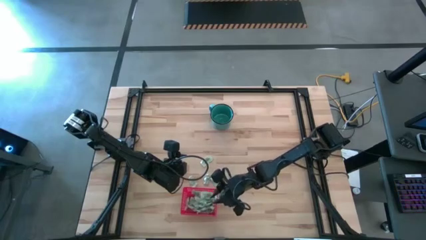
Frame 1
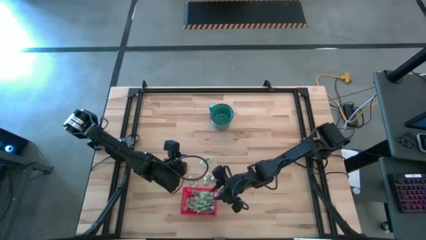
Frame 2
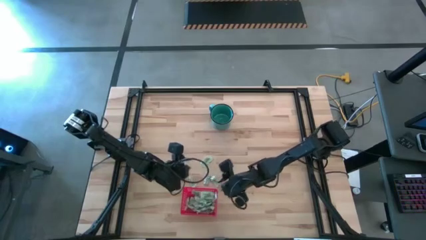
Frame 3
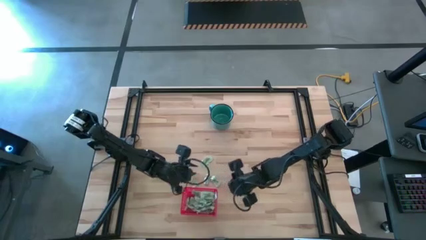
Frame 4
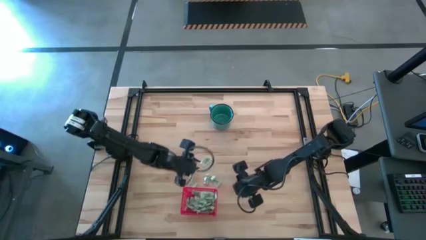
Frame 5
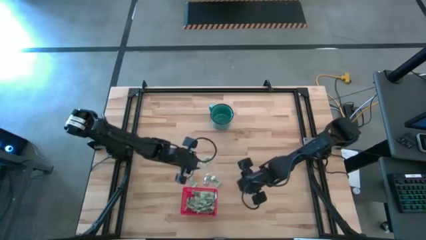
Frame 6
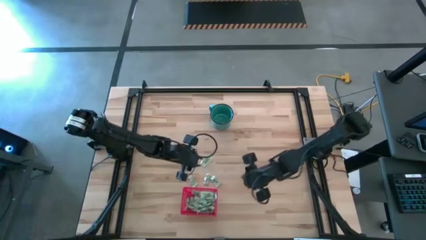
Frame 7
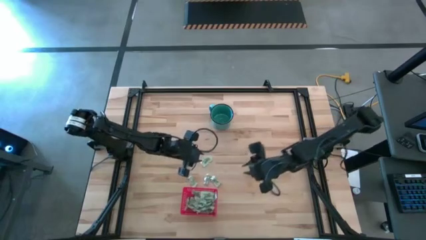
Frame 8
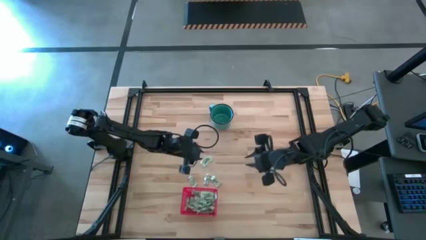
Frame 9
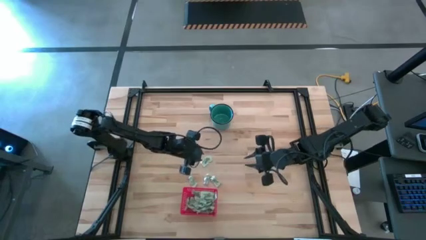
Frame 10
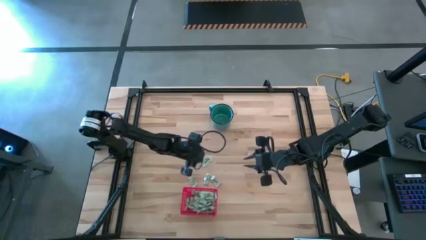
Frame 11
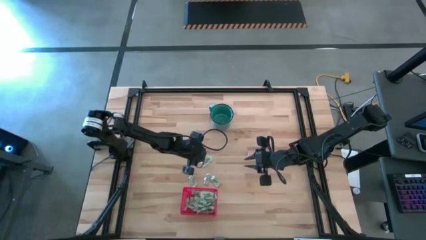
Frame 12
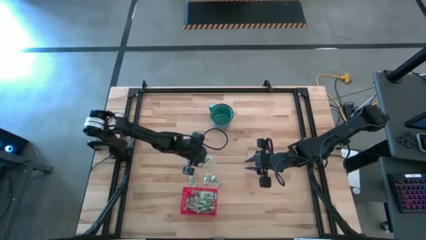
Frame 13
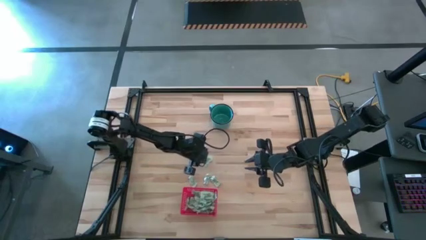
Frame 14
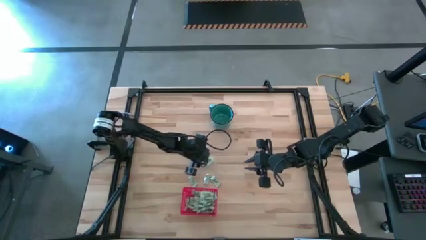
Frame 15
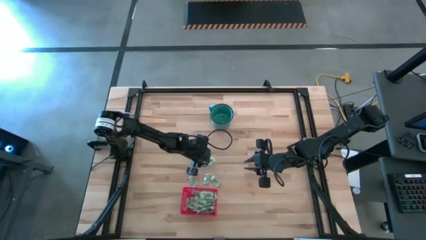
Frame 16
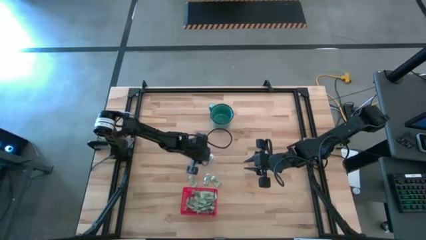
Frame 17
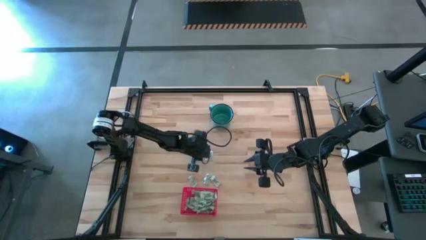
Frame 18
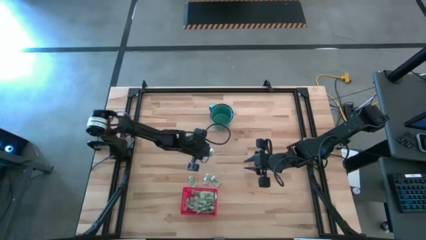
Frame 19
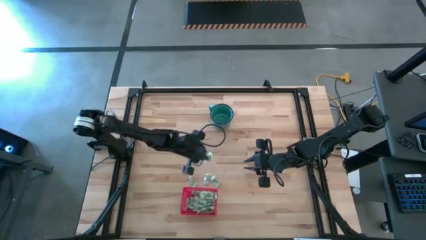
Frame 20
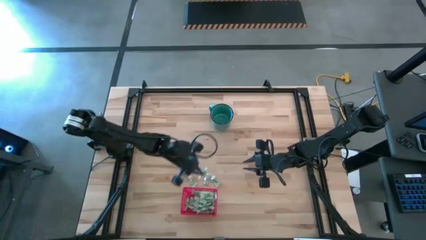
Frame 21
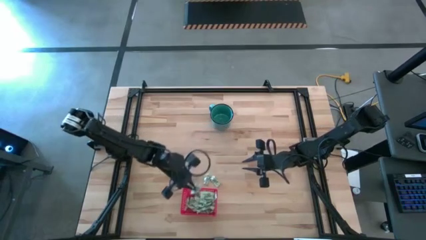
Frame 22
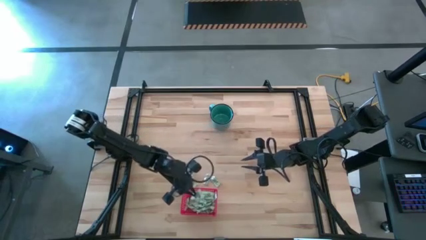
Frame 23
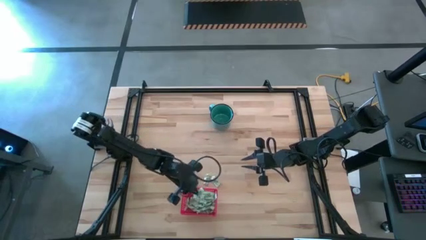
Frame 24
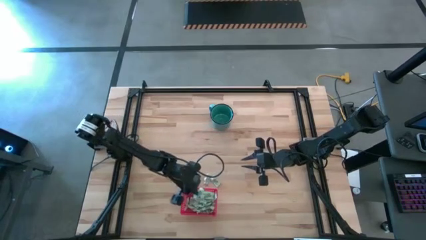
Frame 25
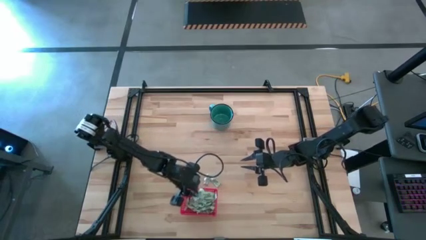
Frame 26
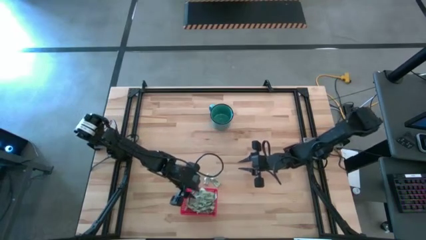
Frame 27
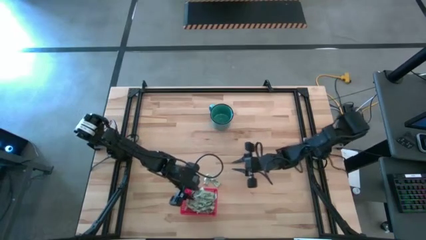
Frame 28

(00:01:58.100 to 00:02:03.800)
Task: Pick and place items into bin
Put the green stevia packet into the red bin

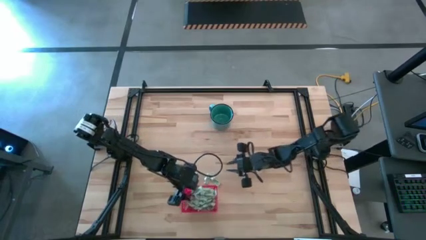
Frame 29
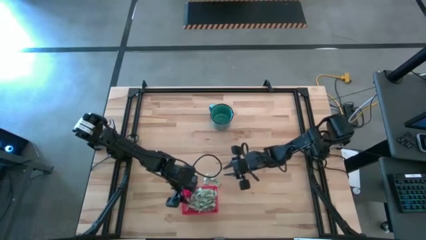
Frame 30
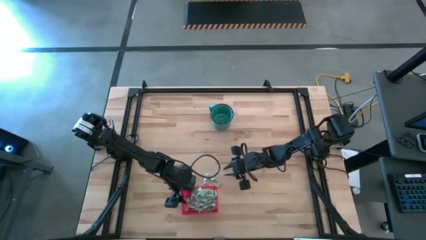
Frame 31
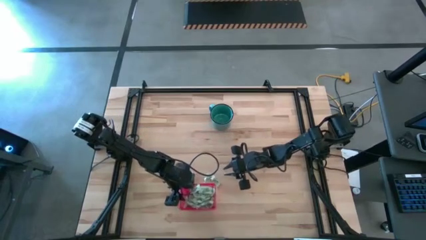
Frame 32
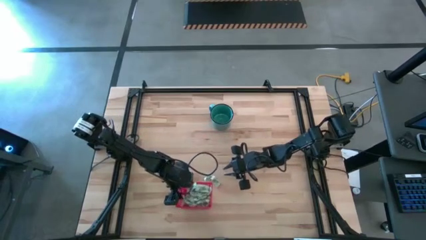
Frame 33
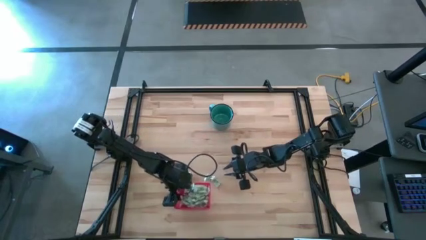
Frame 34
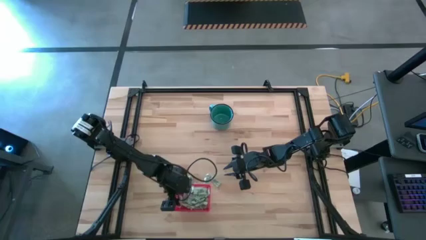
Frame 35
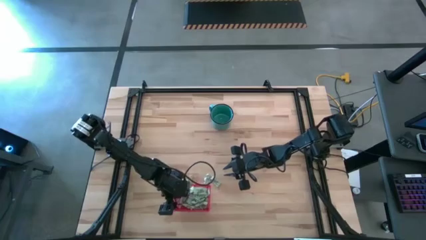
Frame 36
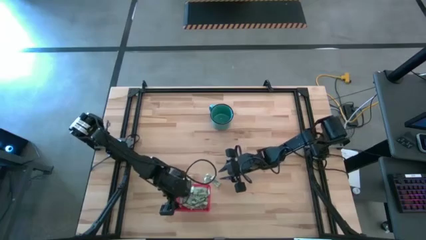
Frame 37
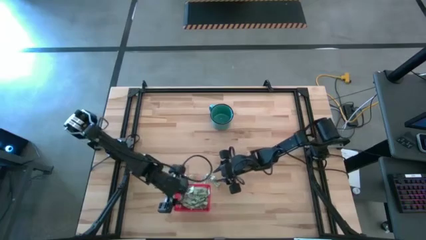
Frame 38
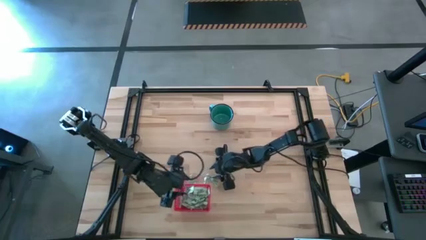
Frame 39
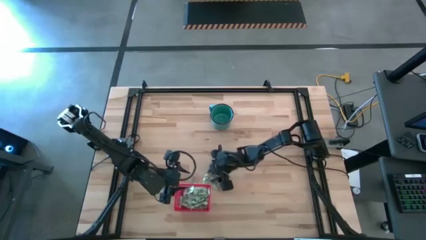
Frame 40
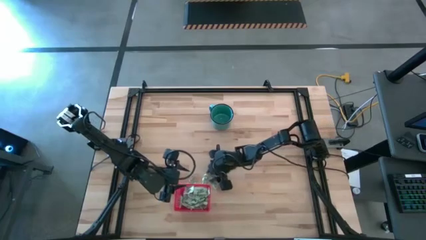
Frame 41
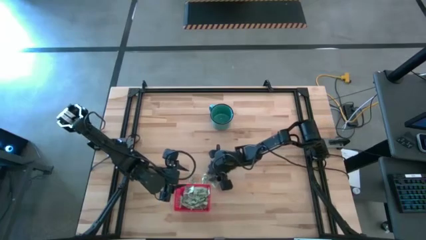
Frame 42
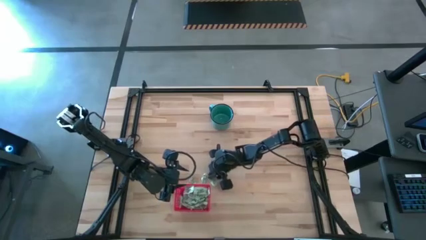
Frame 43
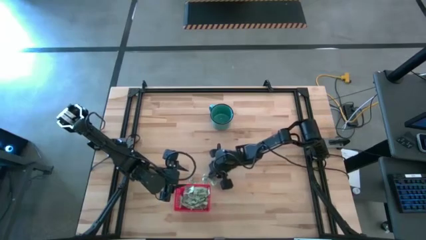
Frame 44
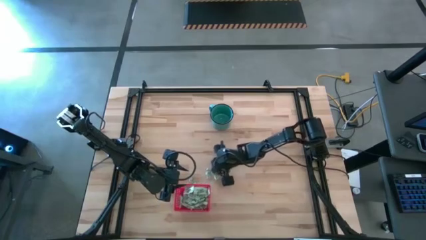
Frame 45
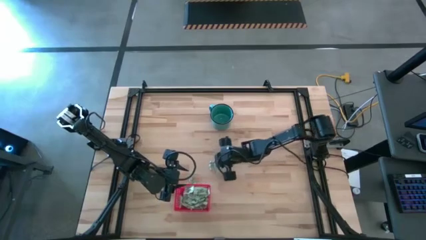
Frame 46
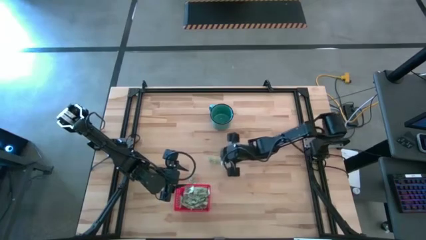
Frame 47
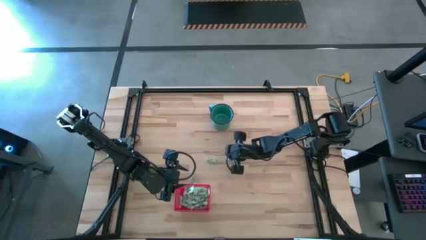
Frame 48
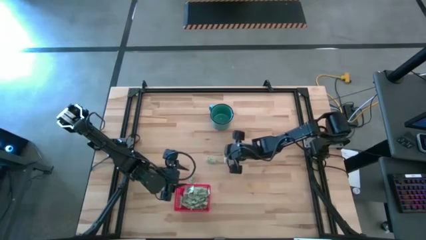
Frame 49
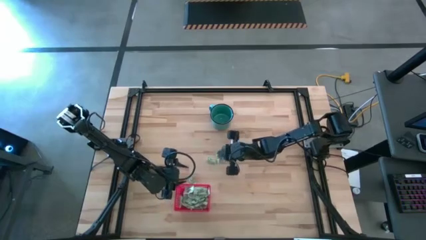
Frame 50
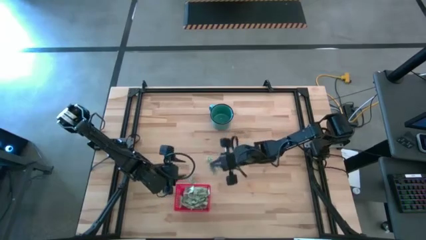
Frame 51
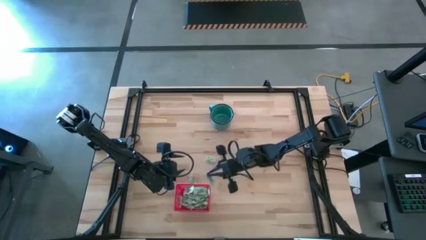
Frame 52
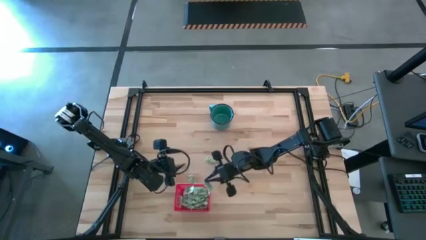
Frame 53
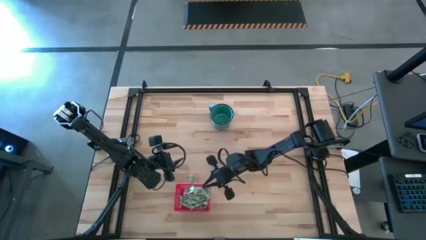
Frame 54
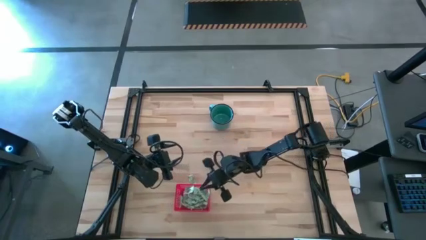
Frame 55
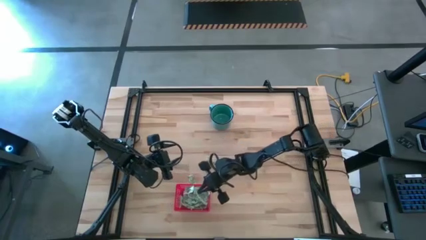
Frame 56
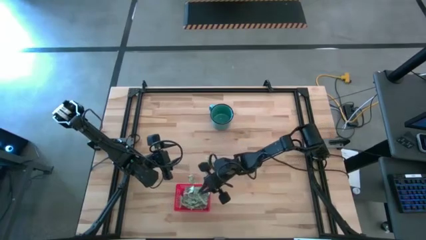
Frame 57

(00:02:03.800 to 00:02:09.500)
Put the green stevia packet into the red bin

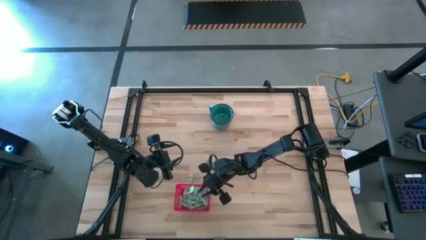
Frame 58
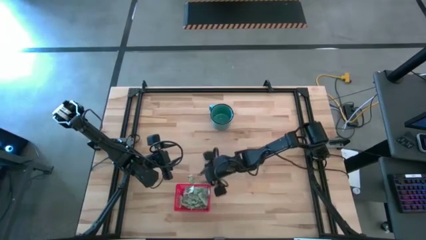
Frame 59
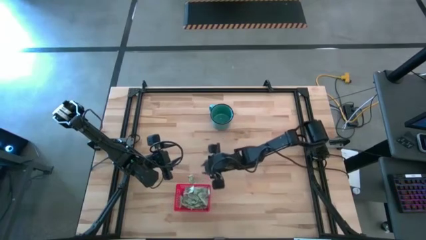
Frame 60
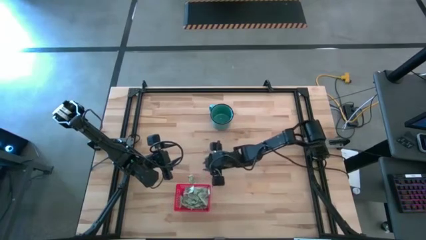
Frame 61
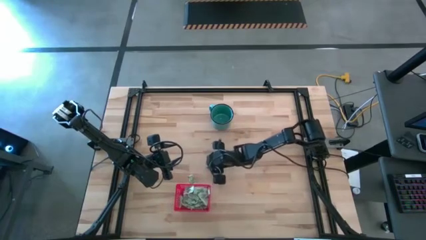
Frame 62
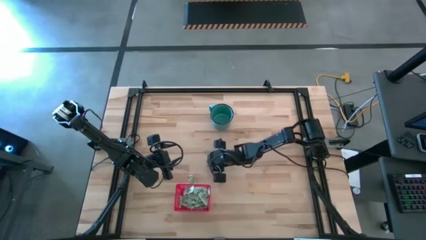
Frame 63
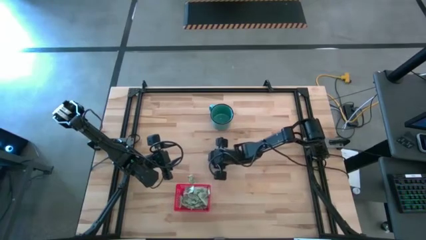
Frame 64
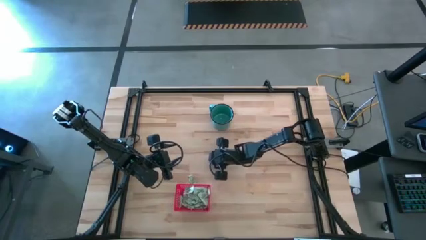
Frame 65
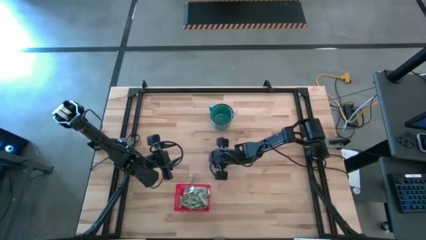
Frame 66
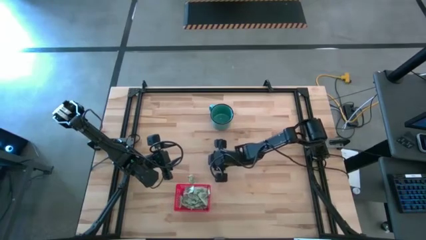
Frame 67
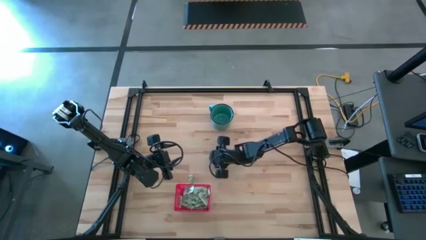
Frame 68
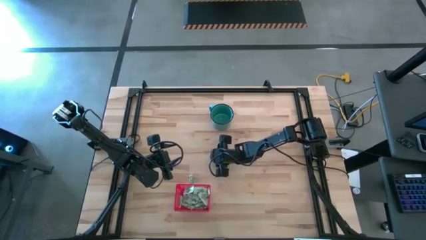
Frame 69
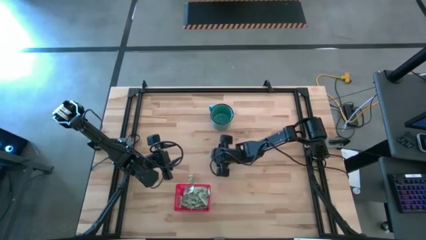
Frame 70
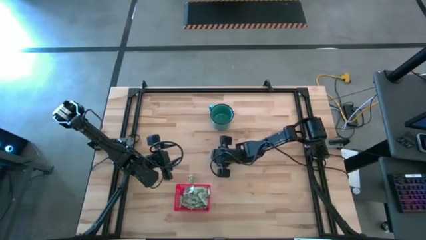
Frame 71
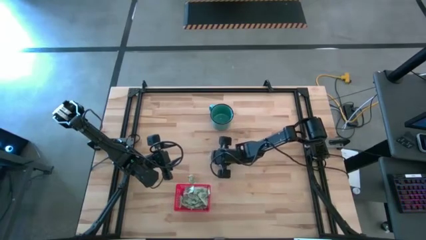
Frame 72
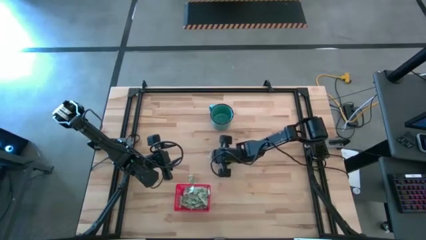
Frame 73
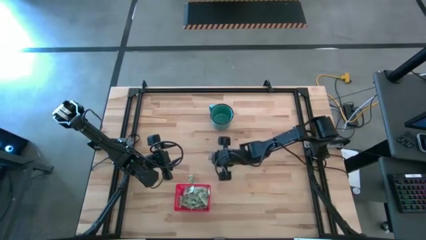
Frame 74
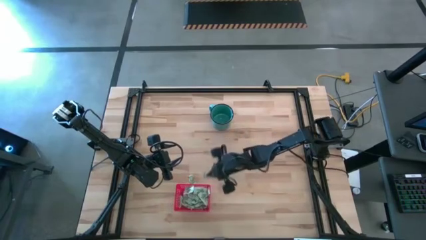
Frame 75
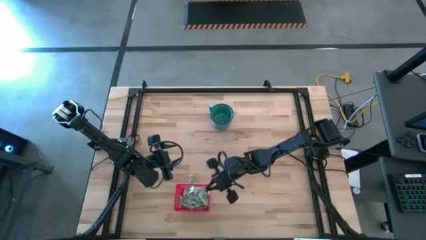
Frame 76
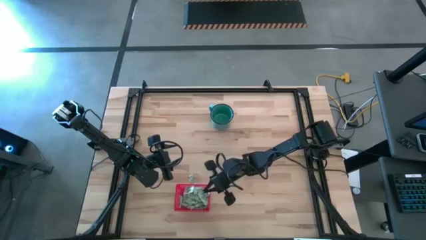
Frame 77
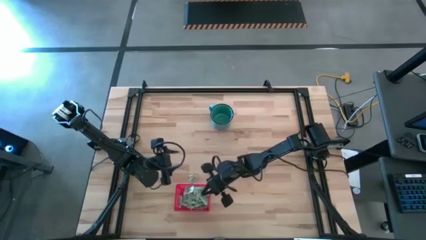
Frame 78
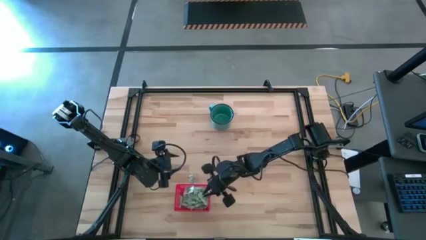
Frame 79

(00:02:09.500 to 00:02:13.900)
Put the green stevia packet into the red bin

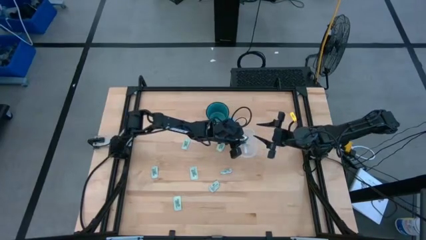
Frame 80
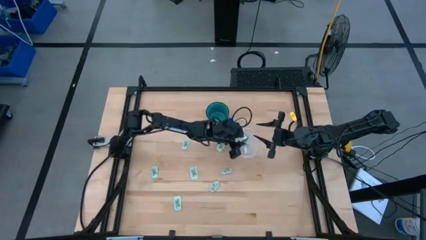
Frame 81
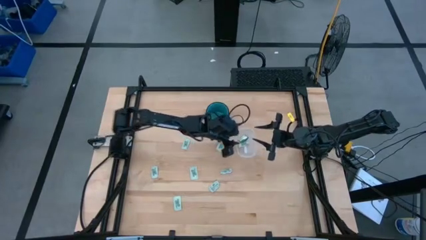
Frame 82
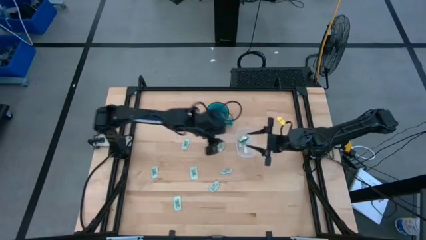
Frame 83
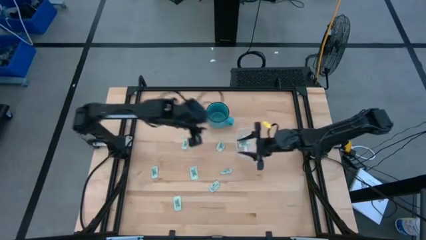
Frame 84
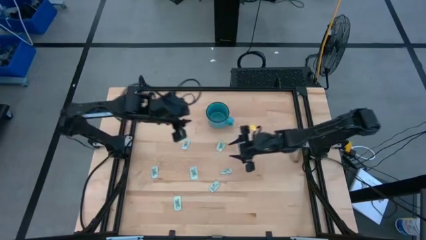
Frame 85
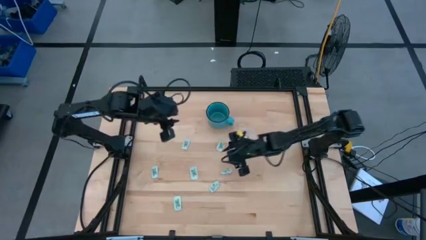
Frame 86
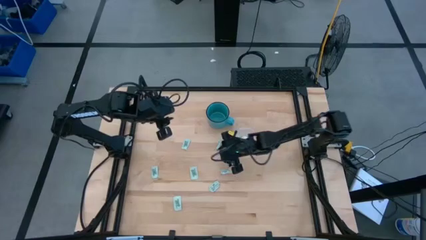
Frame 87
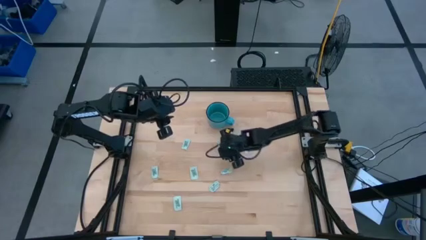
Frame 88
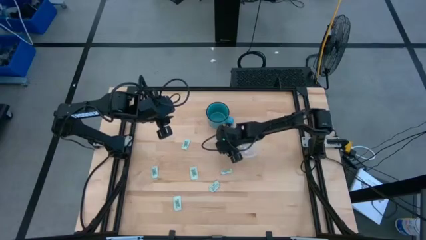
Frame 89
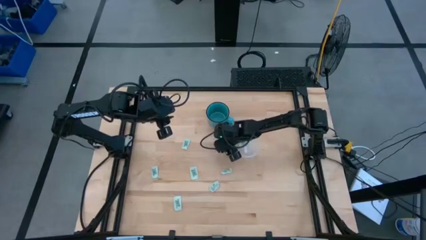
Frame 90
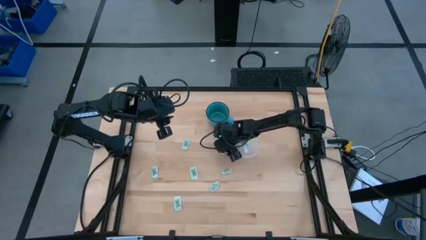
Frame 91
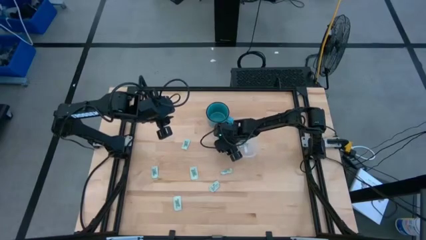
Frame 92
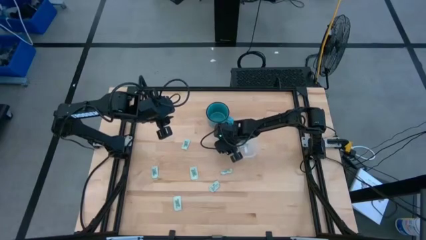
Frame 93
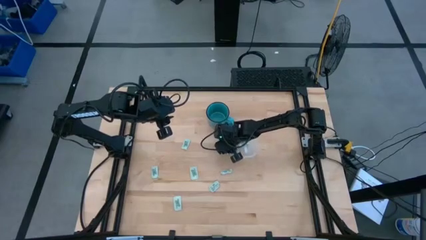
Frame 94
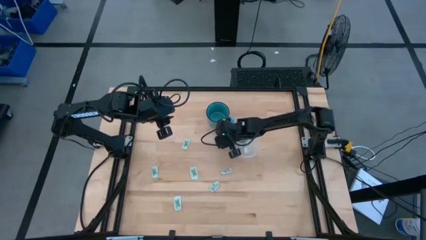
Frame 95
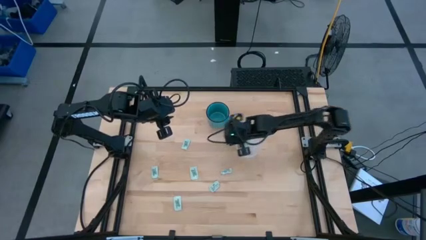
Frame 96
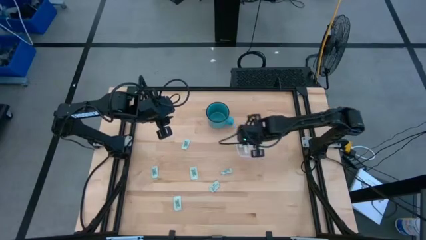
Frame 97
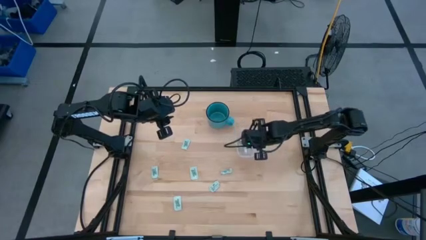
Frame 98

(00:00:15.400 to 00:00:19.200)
Task: Pick and place Stevia / Truvia into bins
Put the stevia packet into the transparent bin
